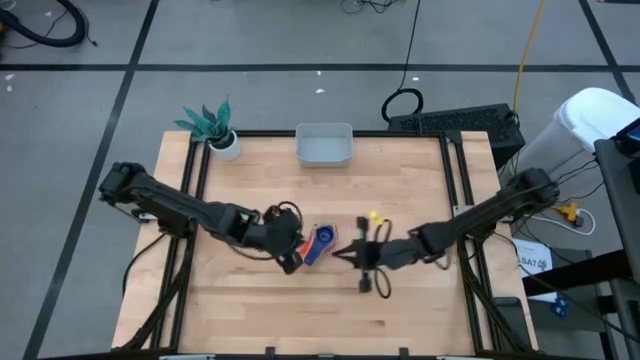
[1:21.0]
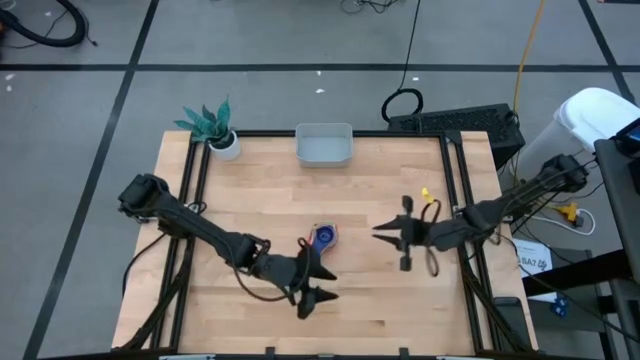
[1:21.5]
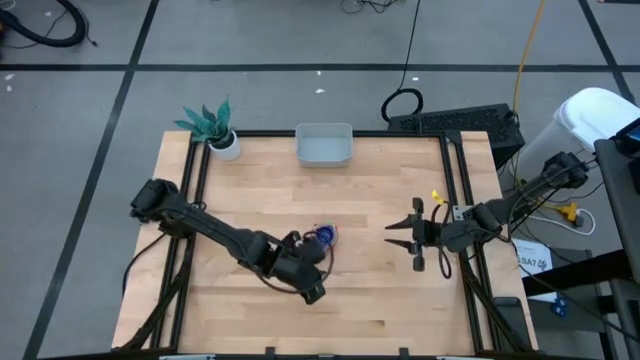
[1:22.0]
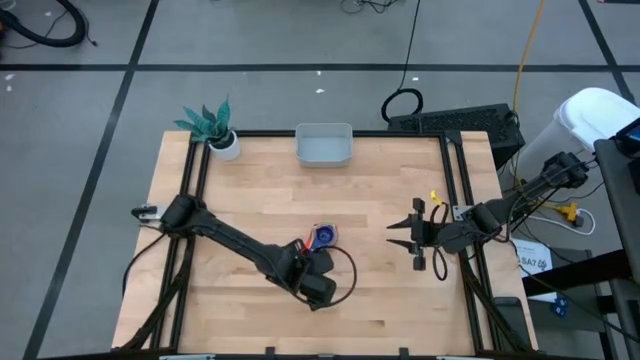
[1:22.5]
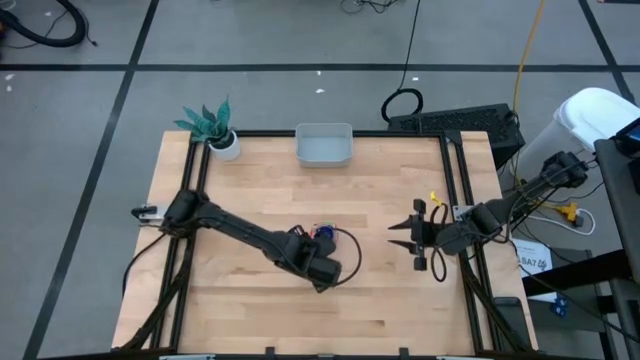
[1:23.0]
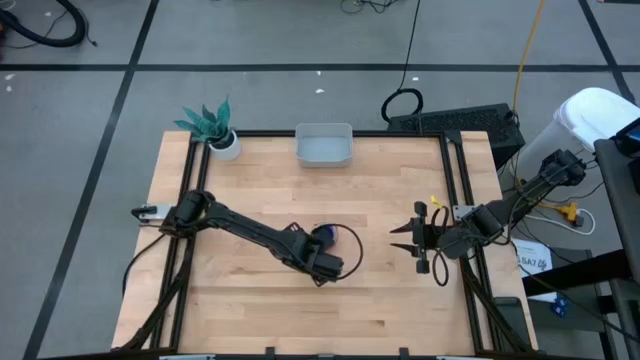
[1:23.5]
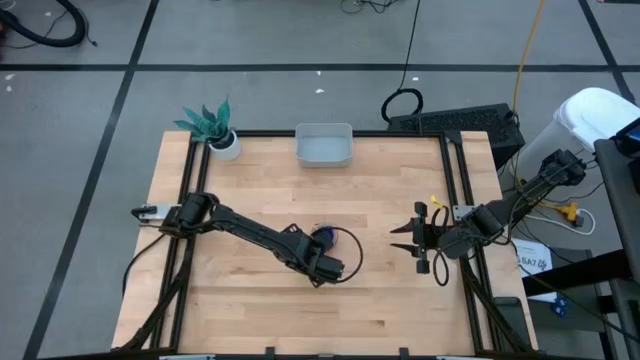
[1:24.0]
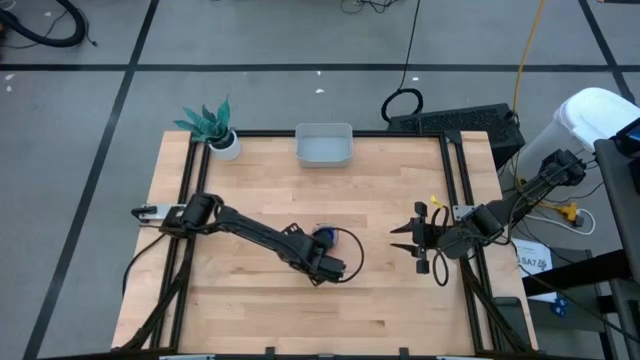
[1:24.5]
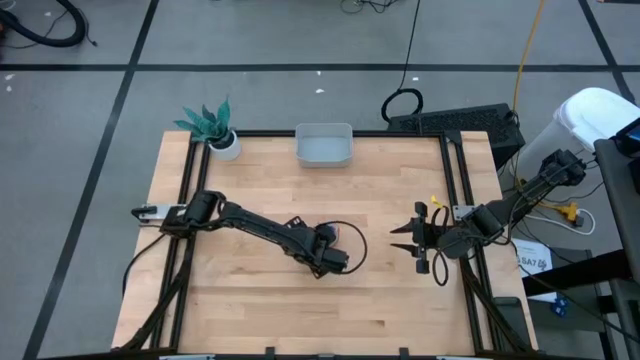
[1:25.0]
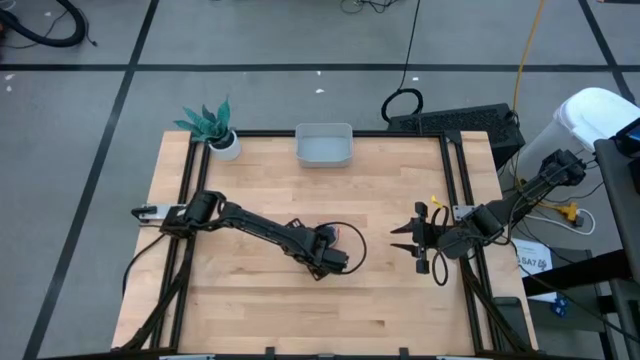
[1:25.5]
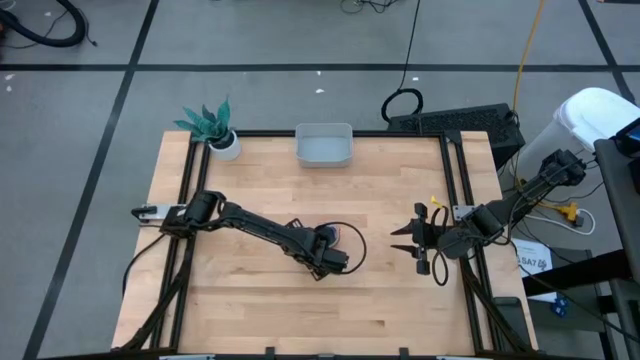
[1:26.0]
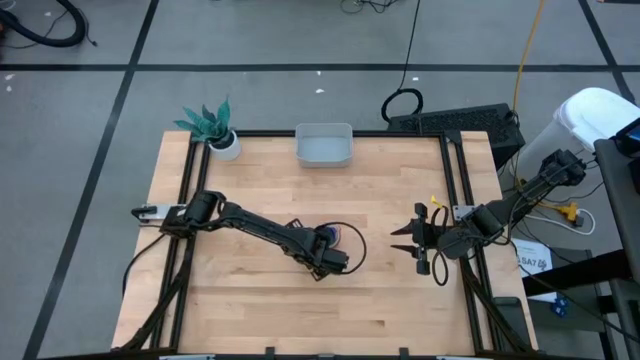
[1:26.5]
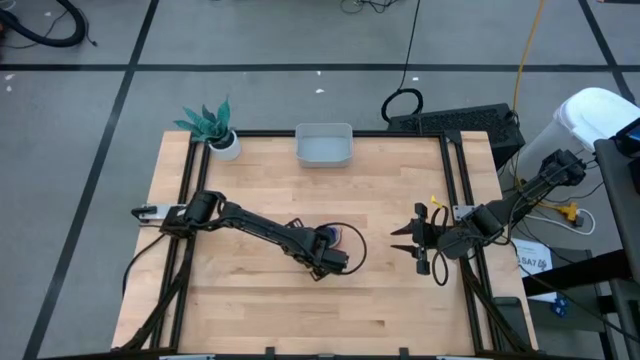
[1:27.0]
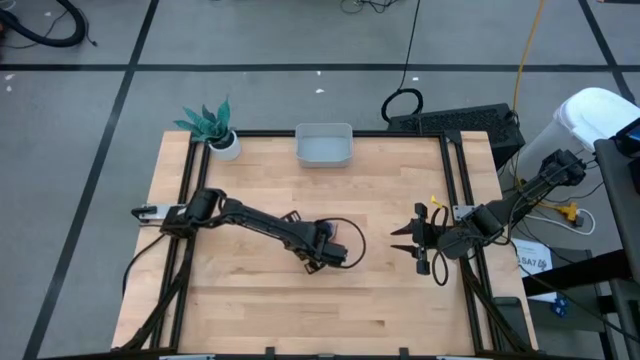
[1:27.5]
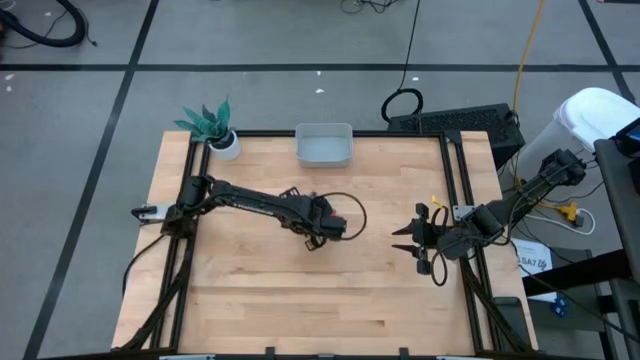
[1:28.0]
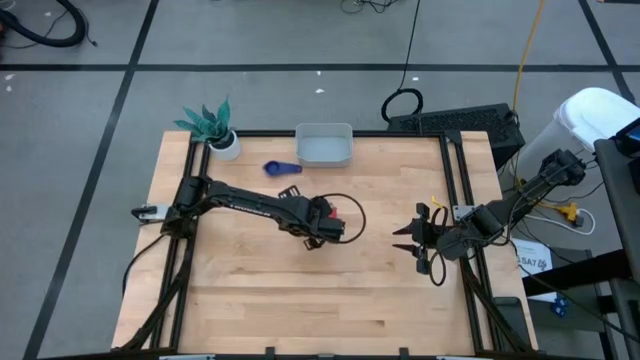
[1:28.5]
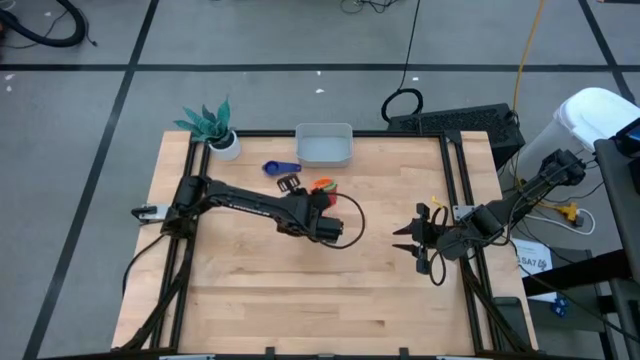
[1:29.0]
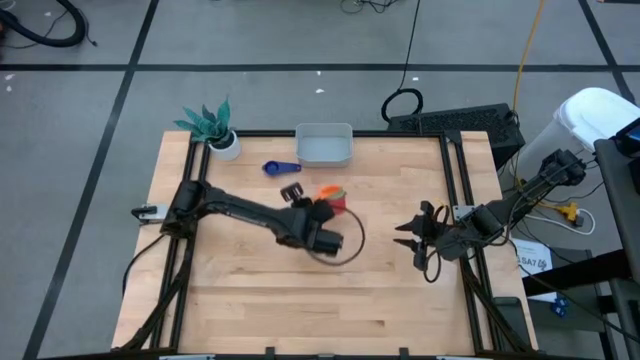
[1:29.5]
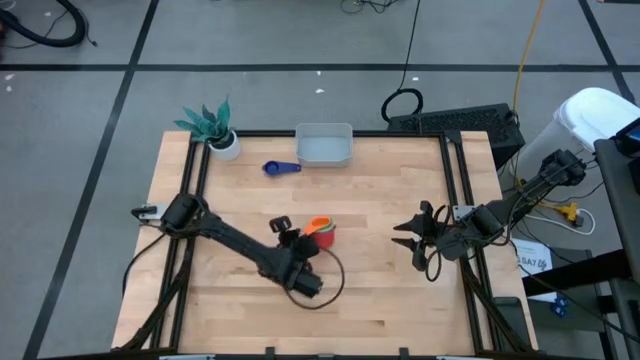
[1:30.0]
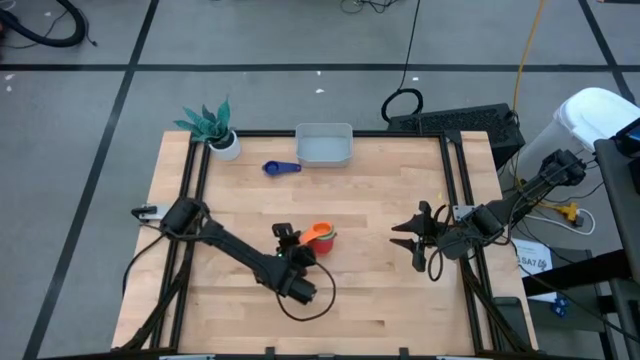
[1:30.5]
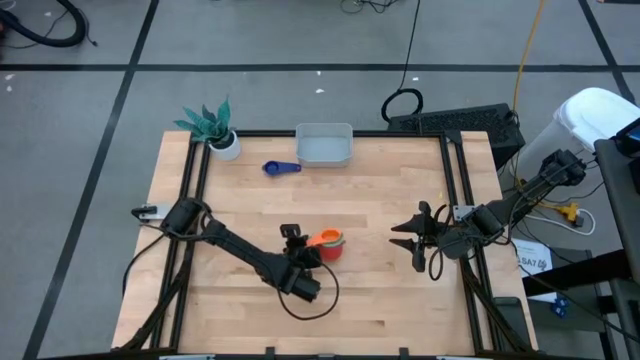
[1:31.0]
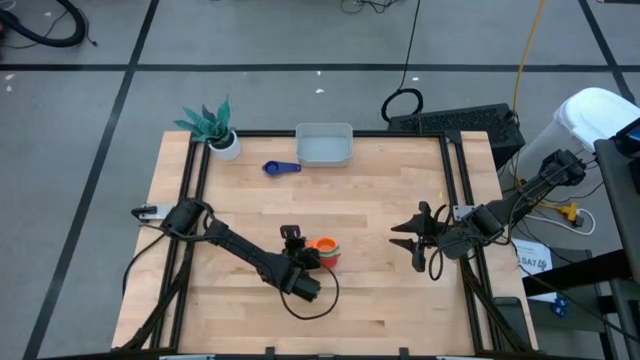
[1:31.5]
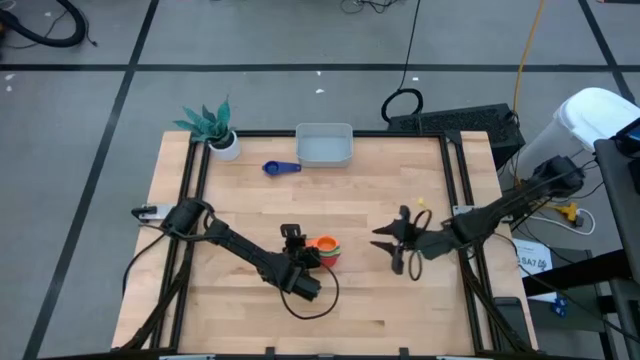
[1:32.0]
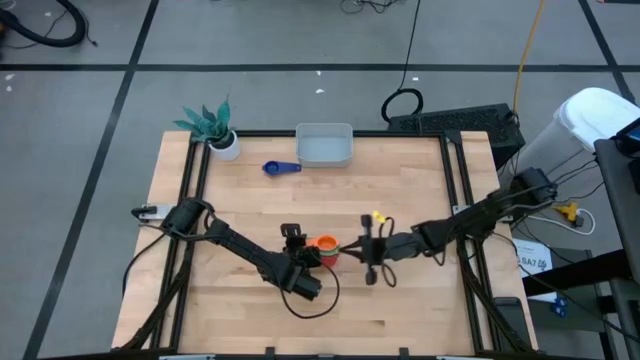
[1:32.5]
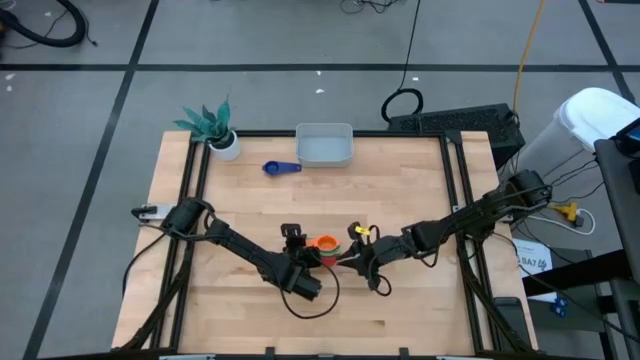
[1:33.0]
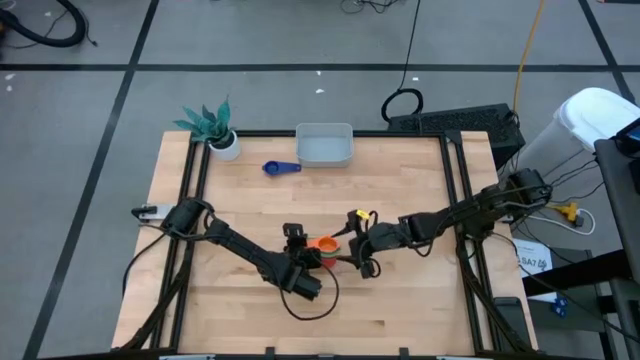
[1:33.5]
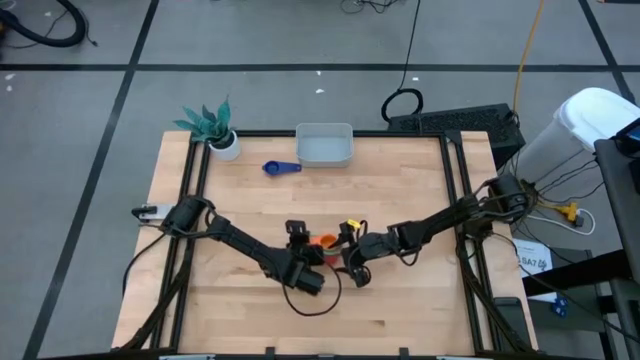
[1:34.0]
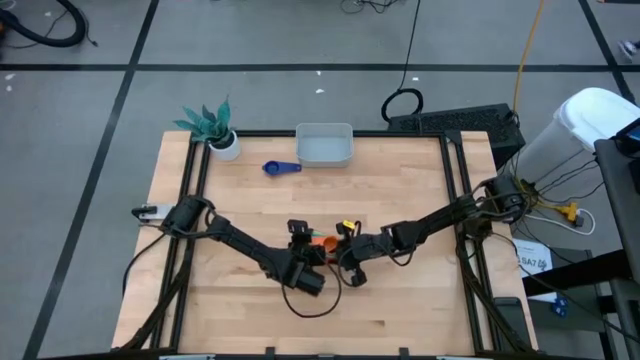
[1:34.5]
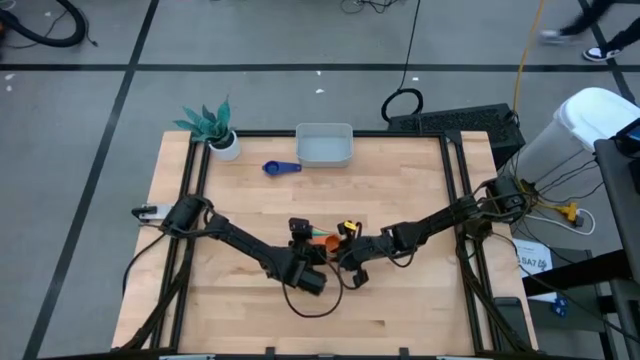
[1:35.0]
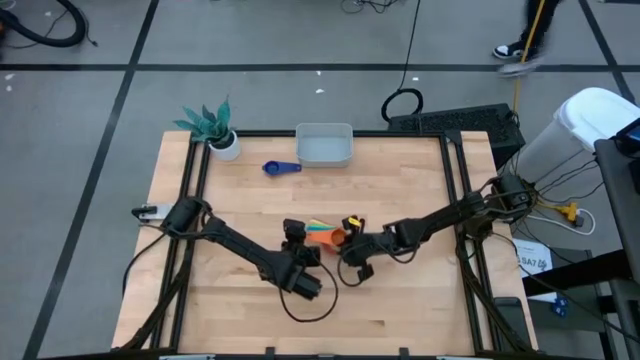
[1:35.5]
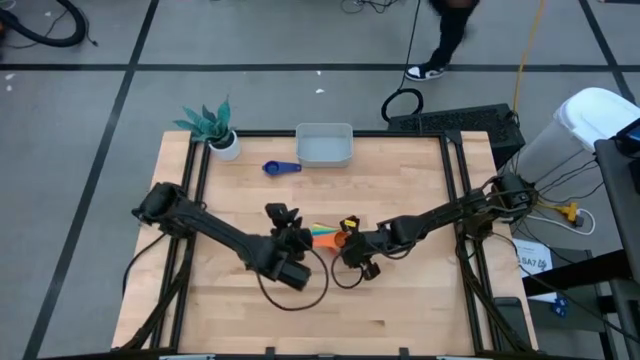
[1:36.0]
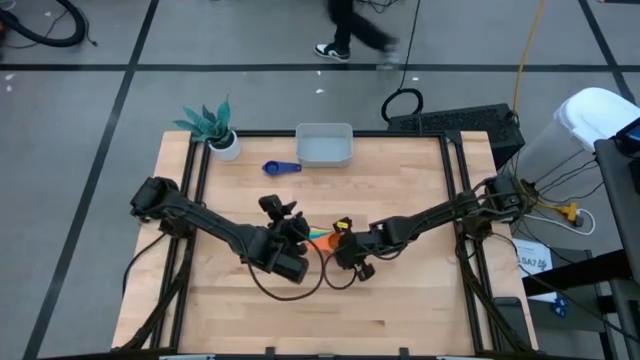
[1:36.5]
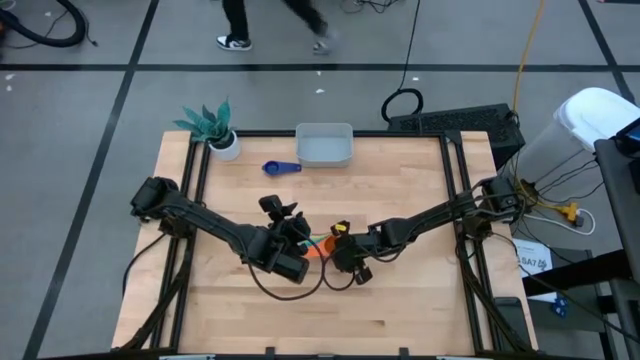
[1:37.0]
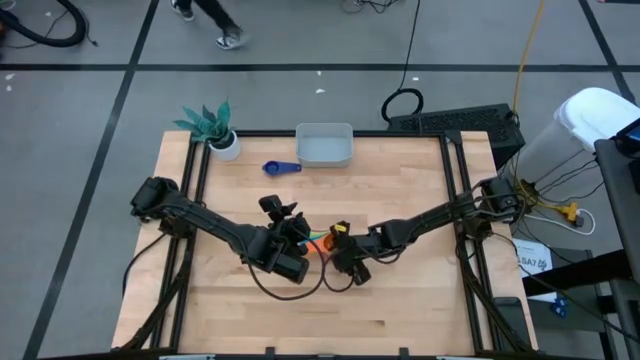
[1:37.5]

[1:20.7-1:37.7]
Task: Nest measuring cups in basket
Put the nested measuring cups into the gray bin

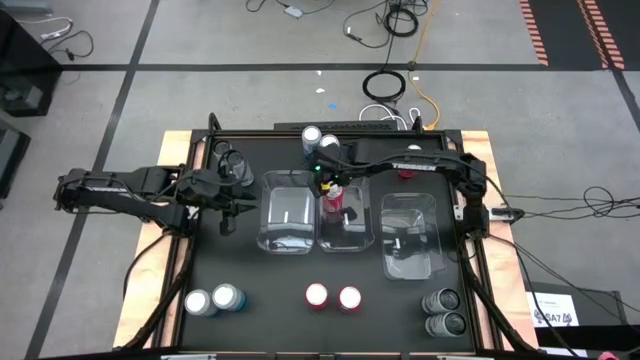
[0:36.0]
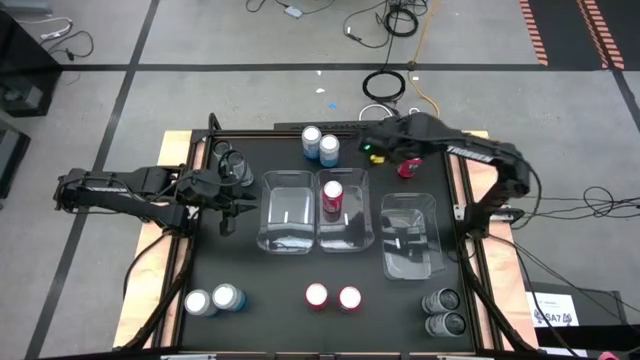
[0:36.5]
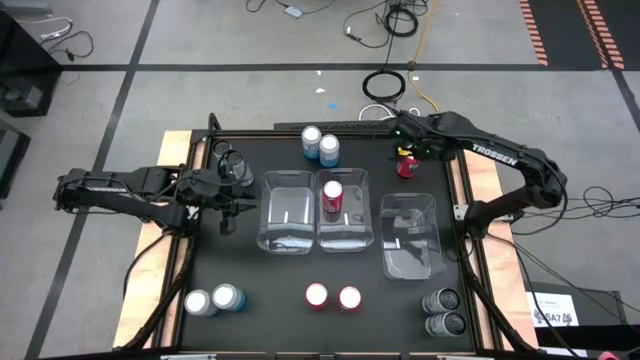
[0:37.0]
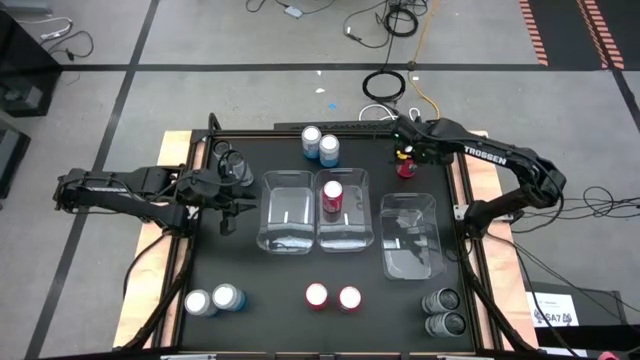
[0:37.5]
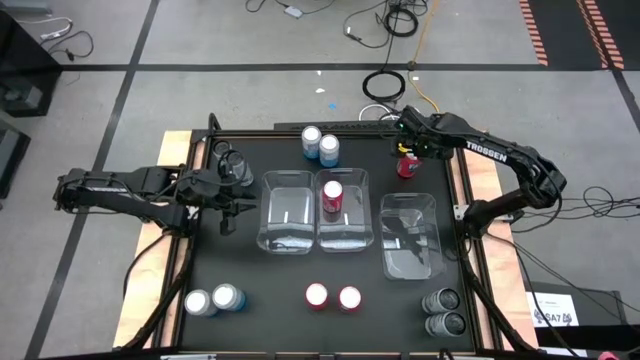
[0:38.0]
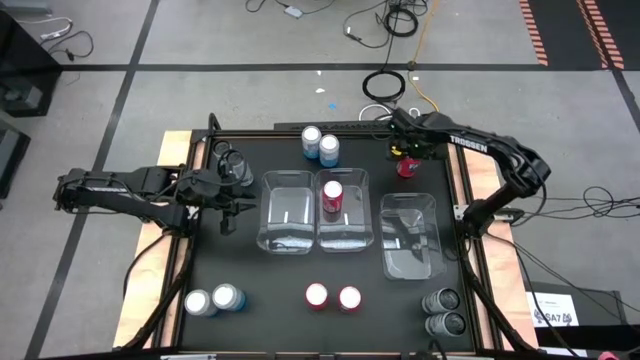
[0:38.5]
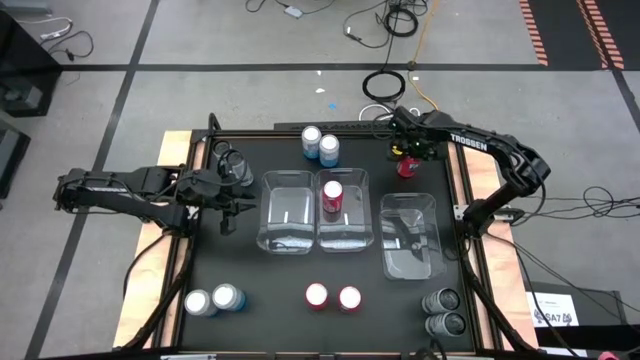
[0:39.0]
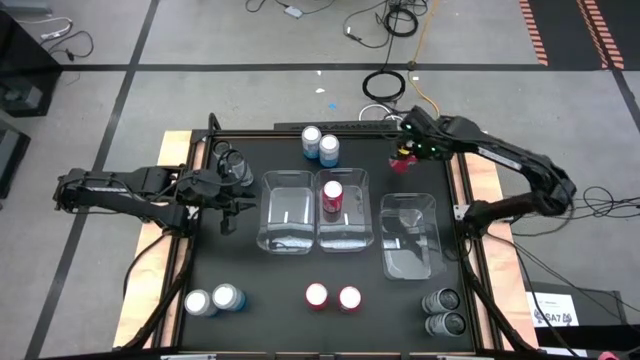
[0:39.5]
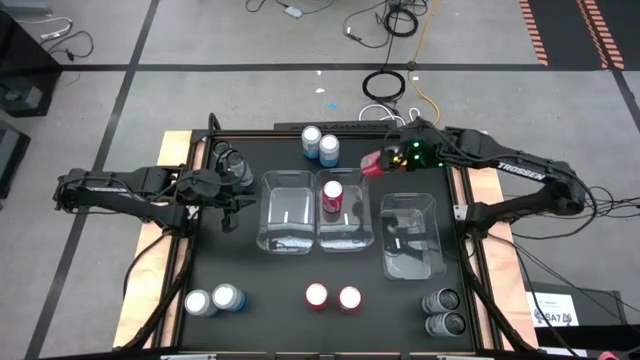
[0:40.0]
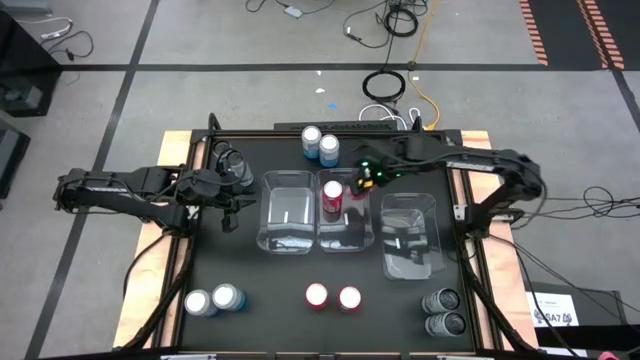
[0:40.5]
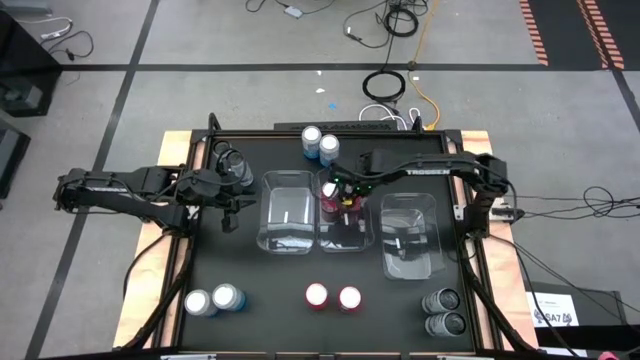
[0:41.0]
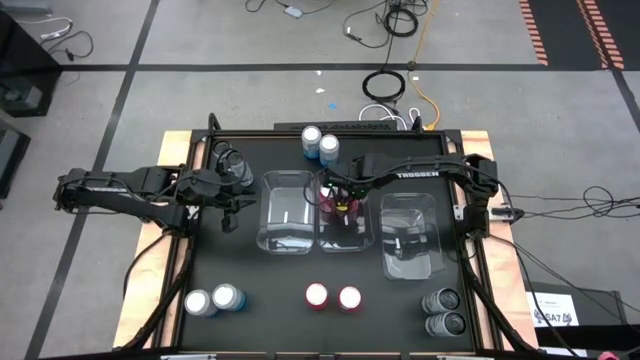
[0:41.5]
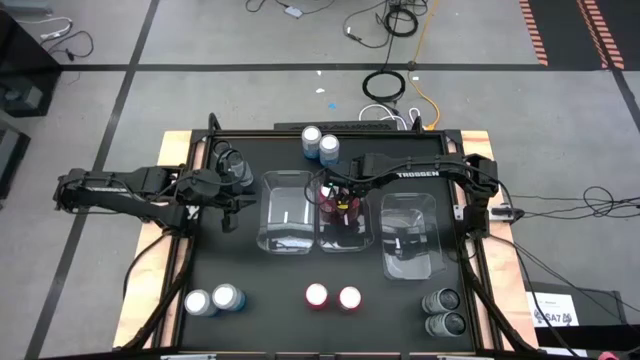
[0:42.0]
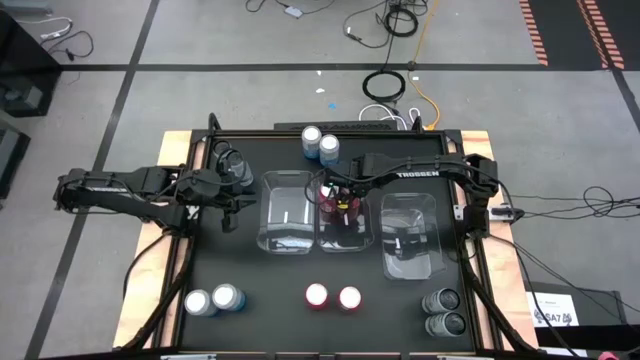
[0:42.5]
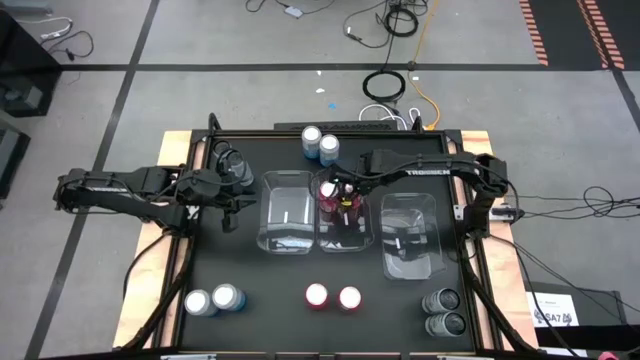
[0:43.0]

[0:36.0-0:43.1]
Task: Sort soda cans
Put the orange soda can into the center transparent bin
